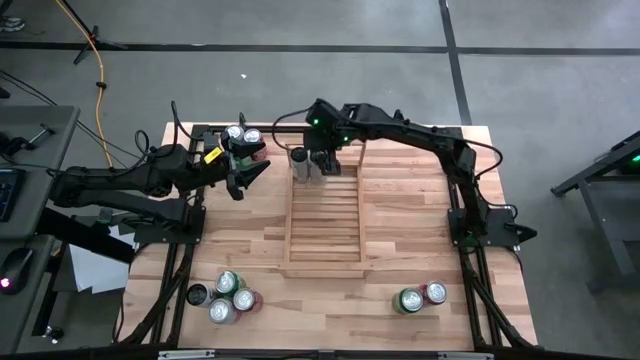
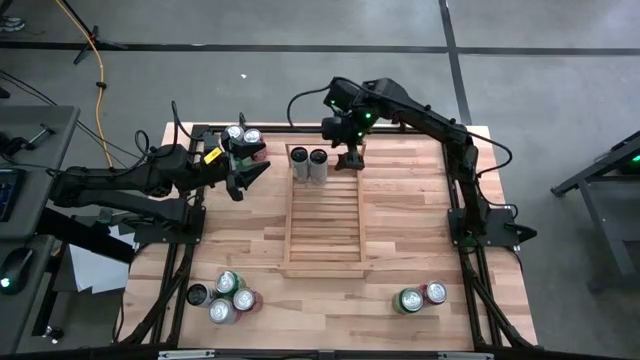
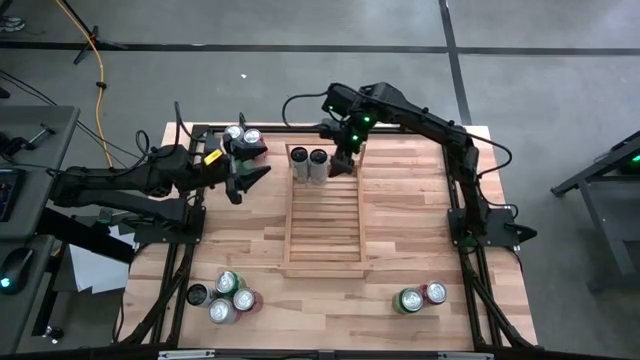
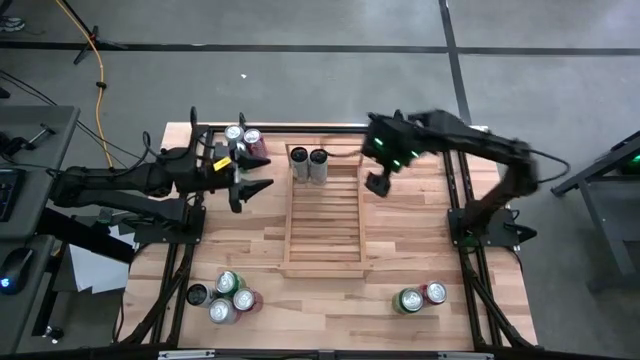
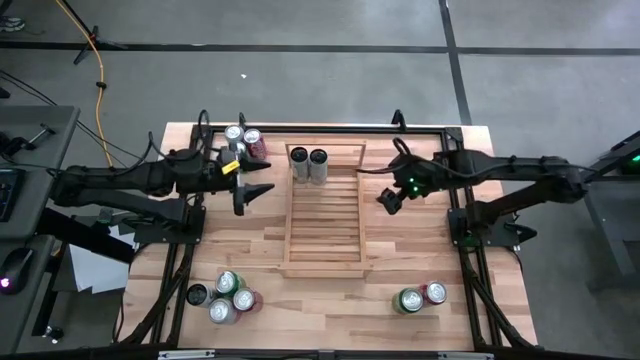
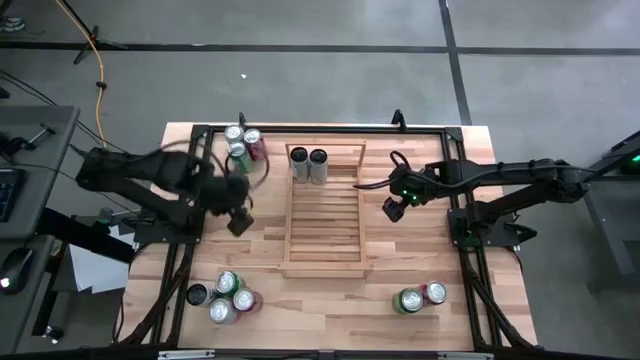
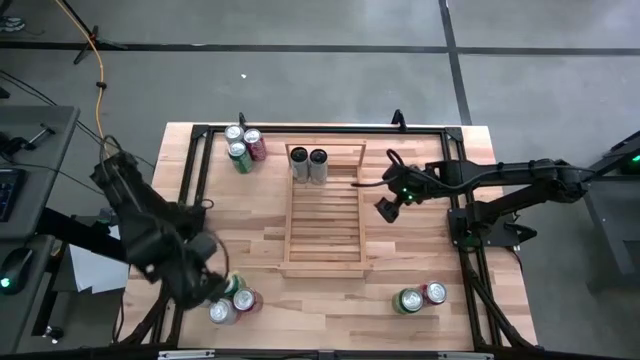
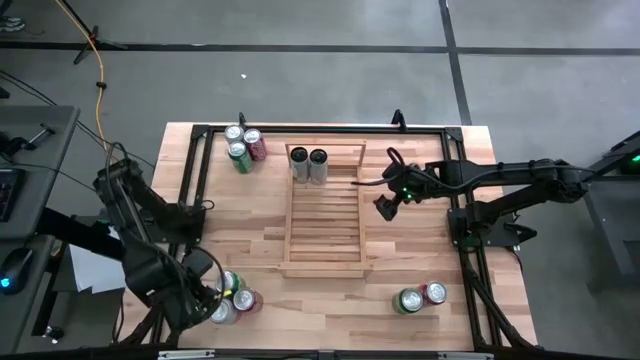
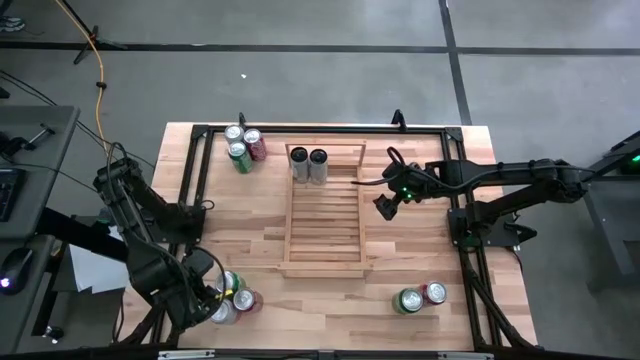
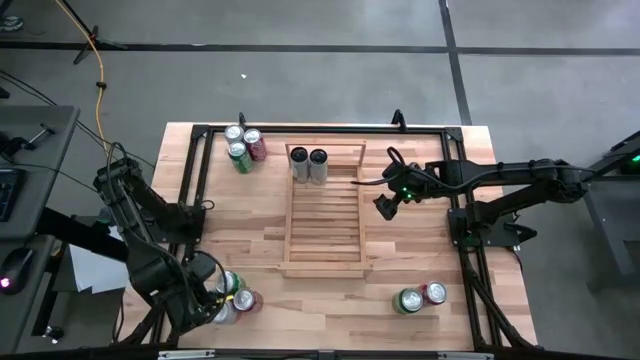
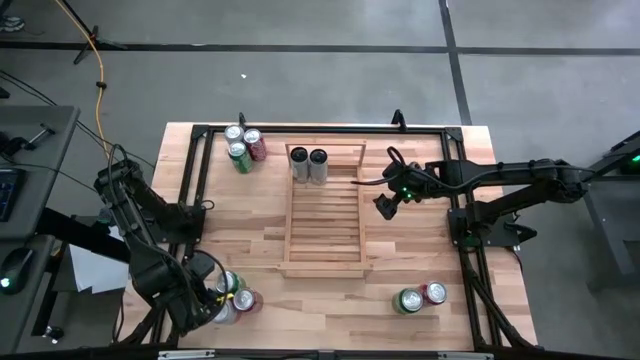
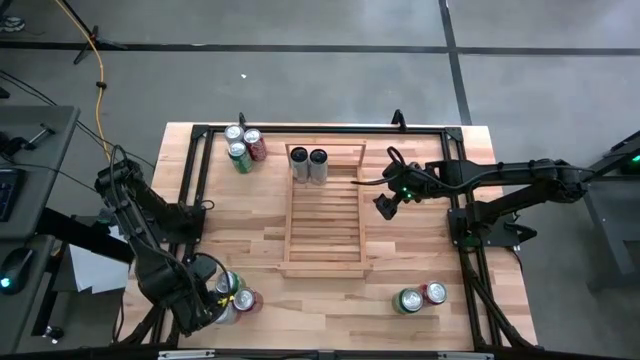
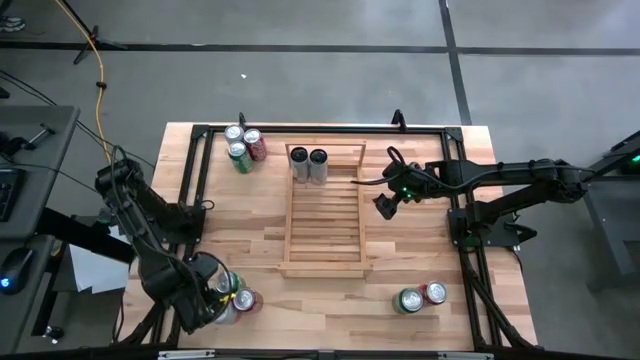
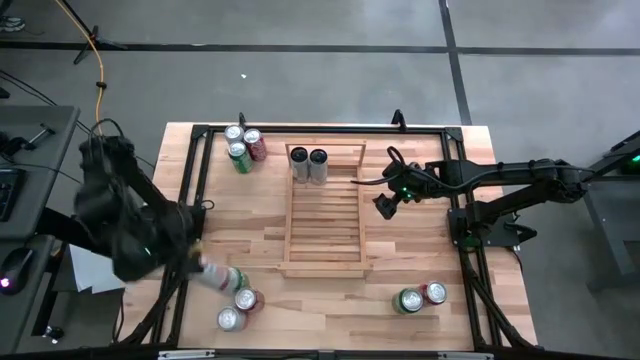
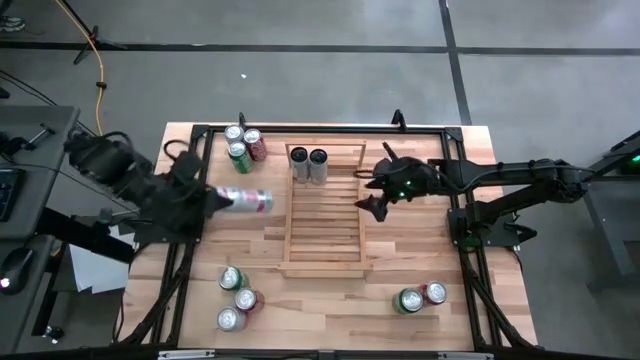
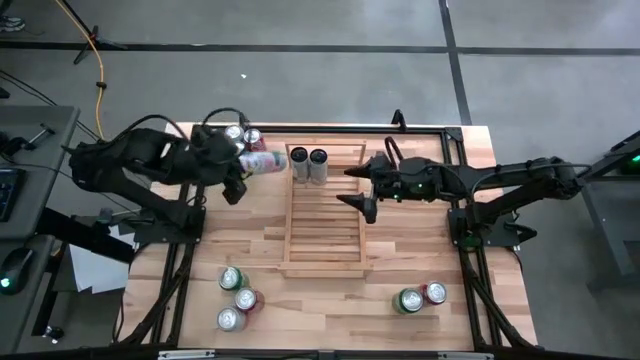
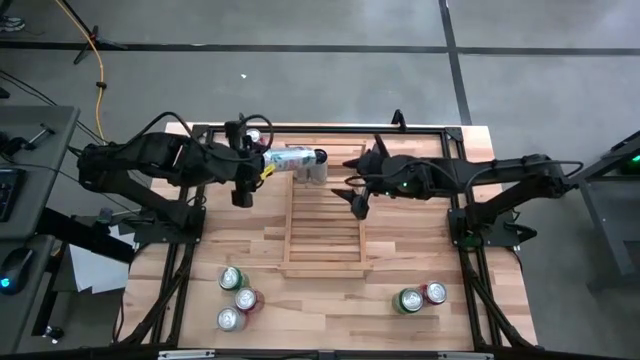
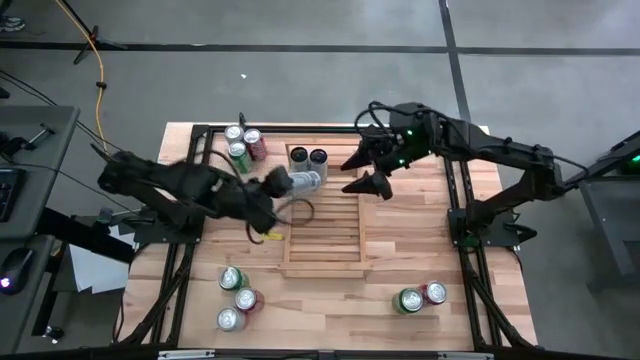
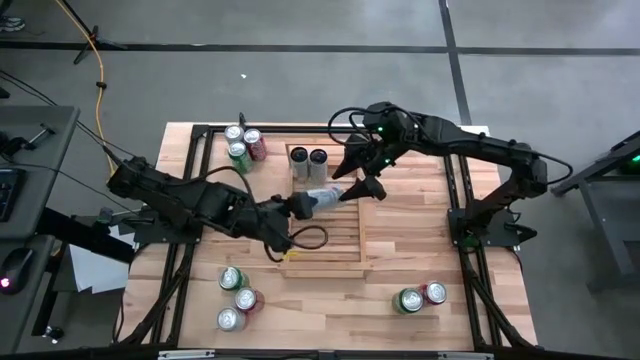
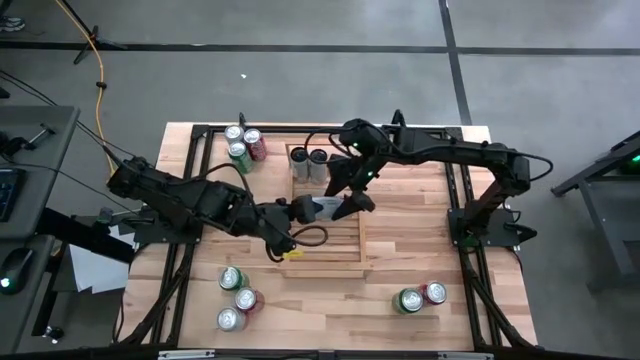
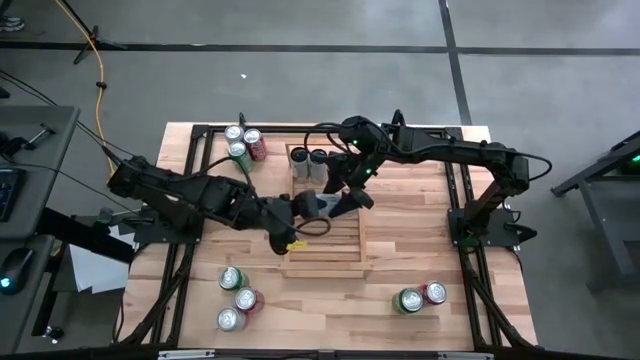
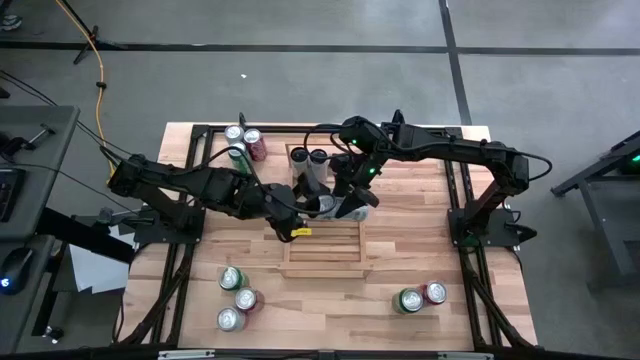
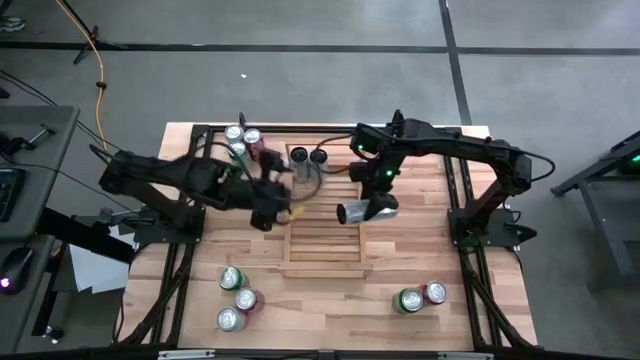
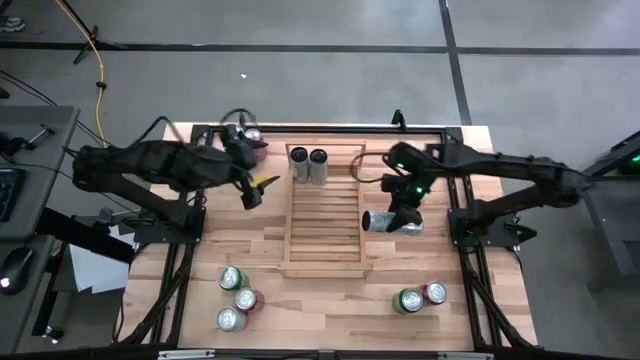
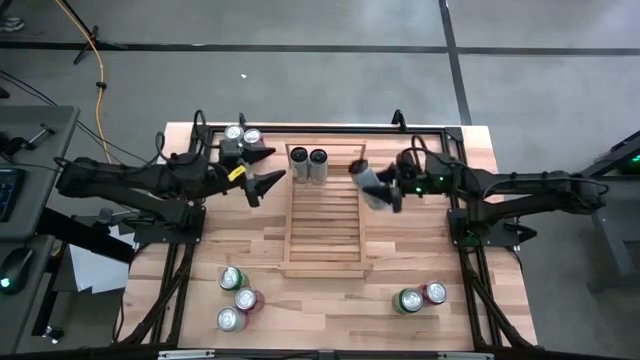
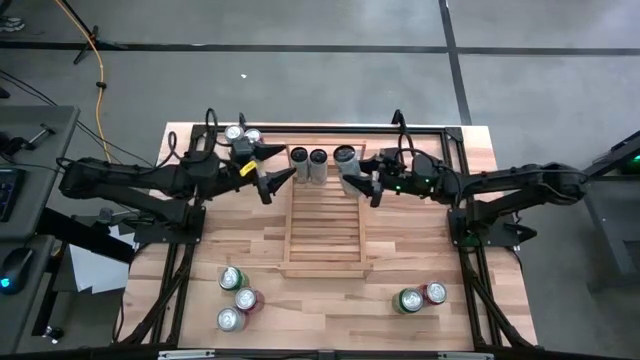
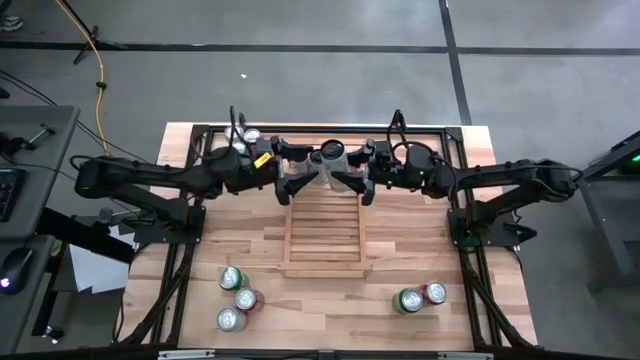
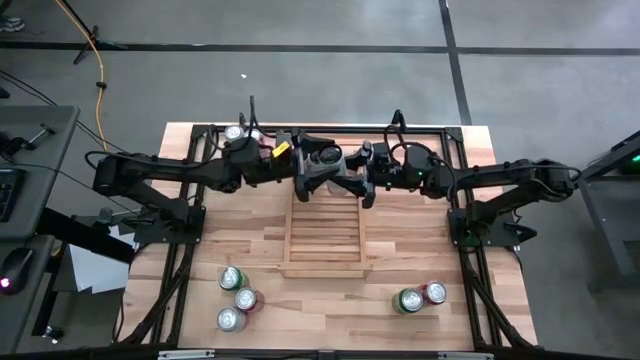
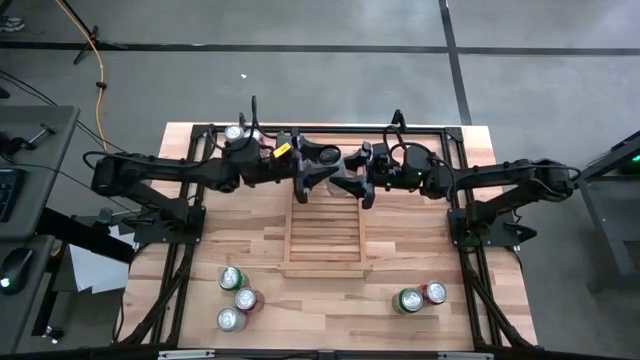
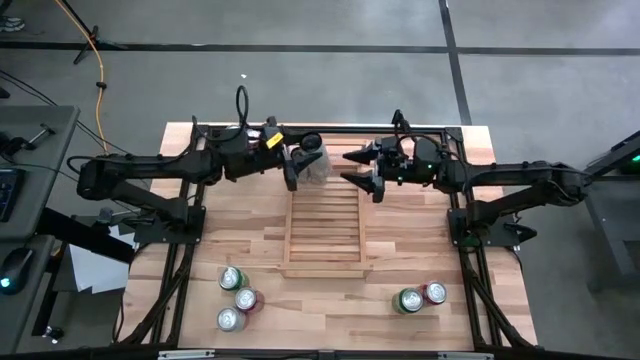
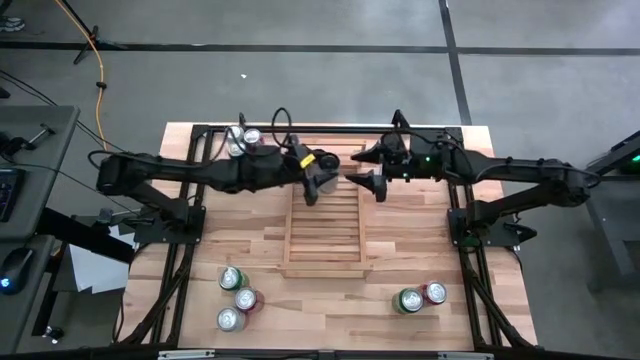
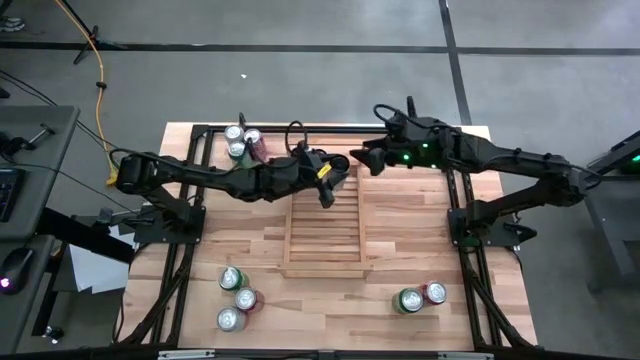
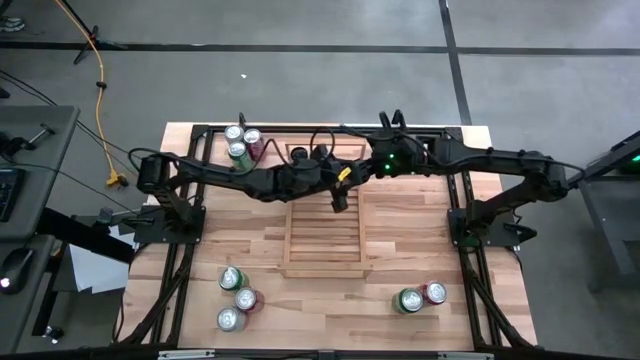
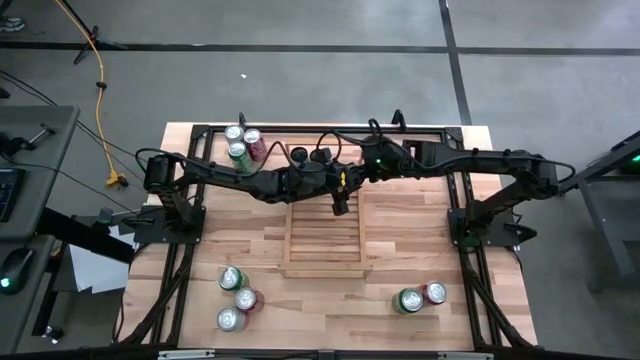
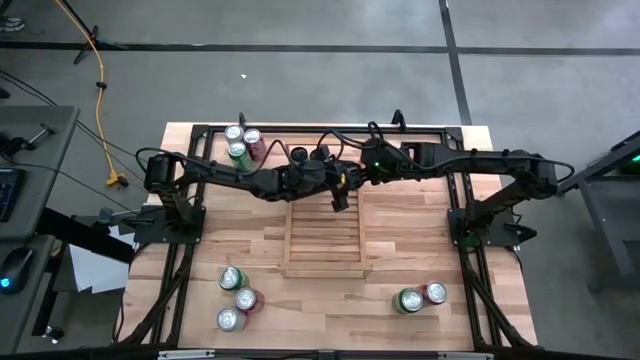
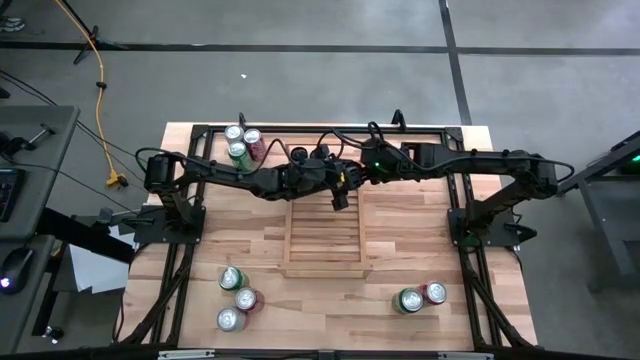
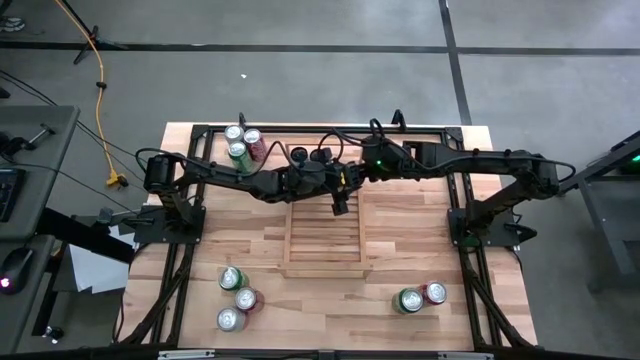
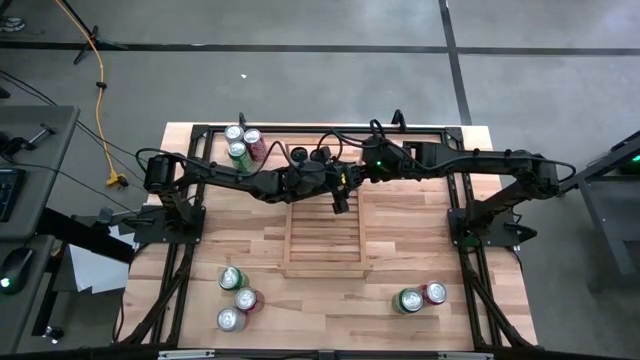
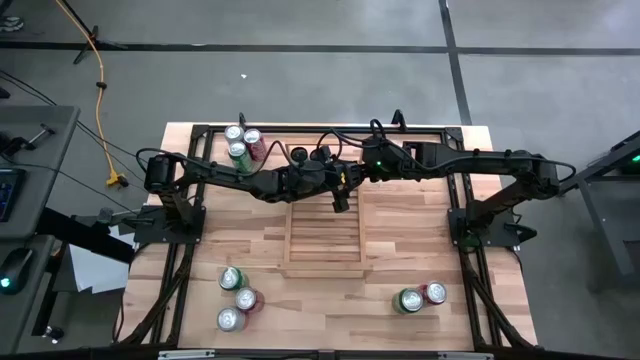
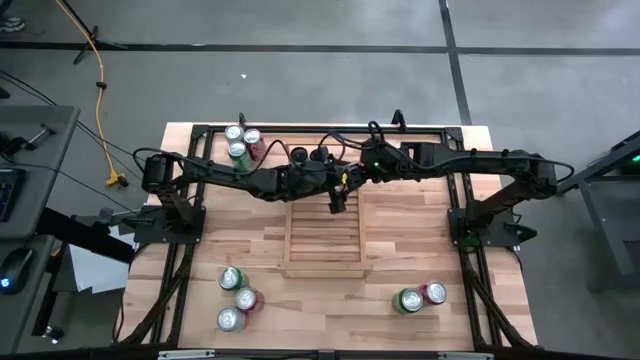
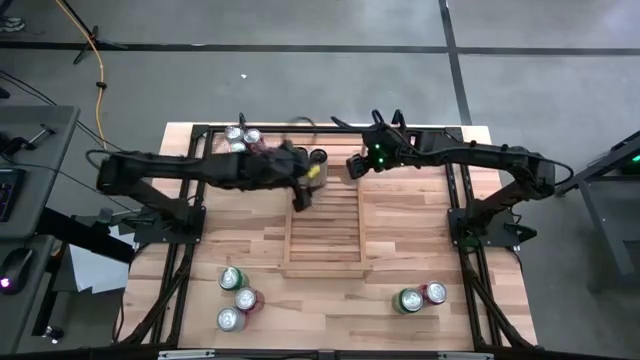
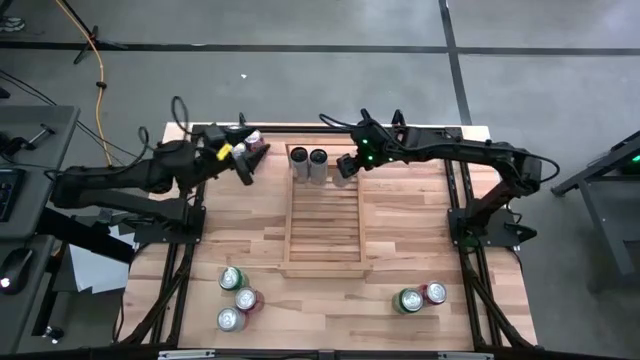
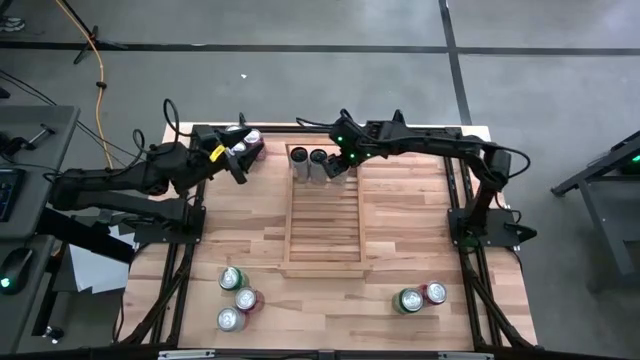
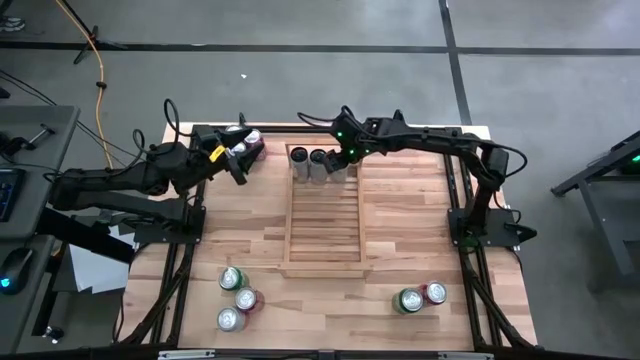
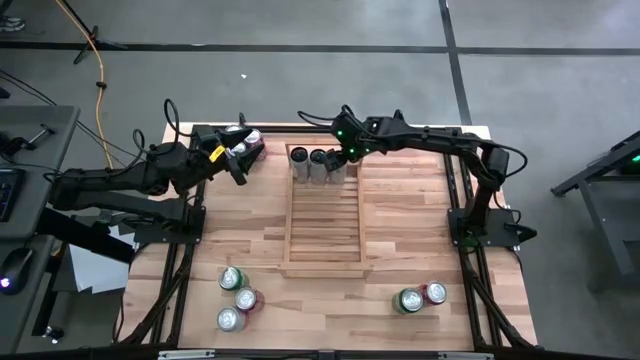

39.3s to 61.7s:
Task: Place canned beverage on shelf
Put the white and pink can on the shelf aligned with the other white and pink cans
